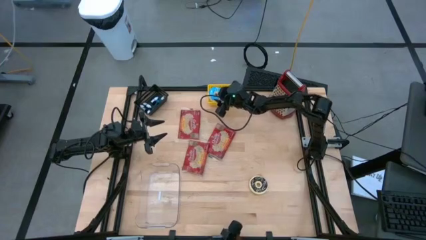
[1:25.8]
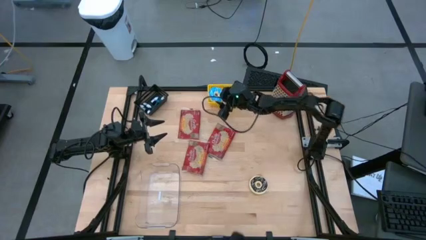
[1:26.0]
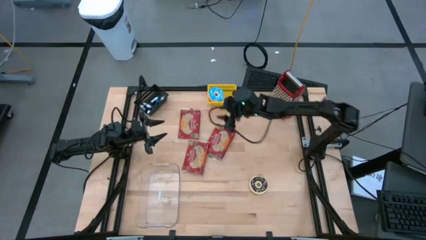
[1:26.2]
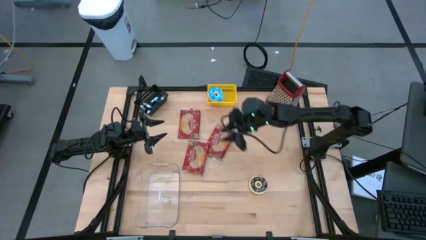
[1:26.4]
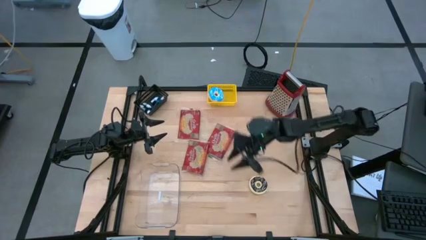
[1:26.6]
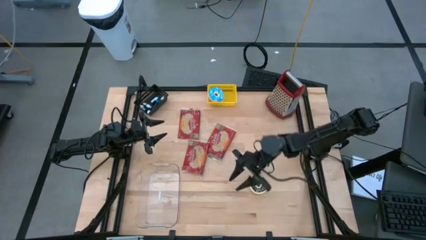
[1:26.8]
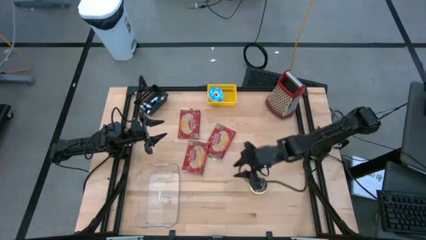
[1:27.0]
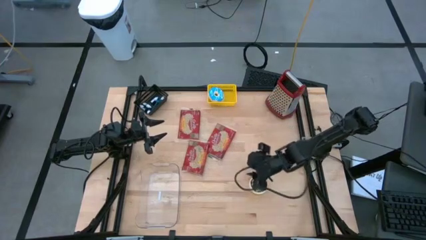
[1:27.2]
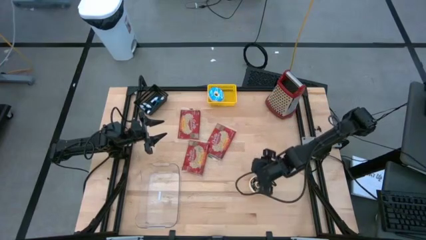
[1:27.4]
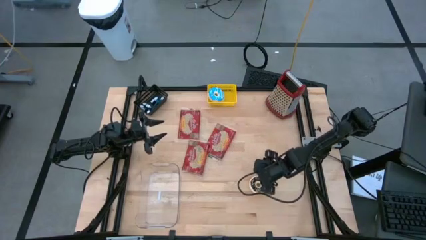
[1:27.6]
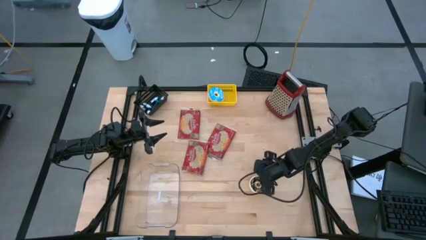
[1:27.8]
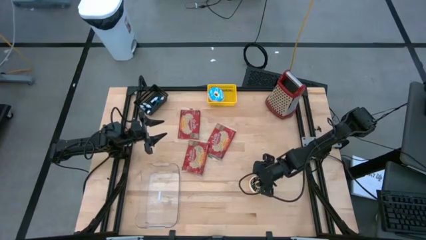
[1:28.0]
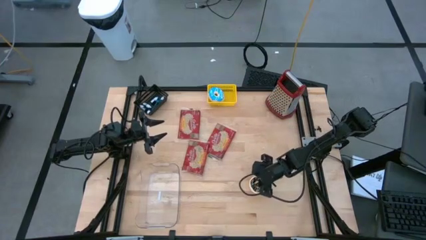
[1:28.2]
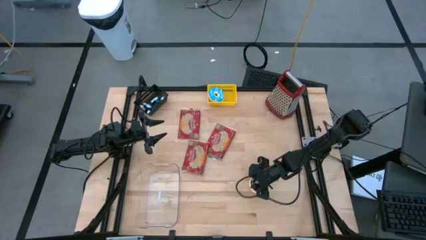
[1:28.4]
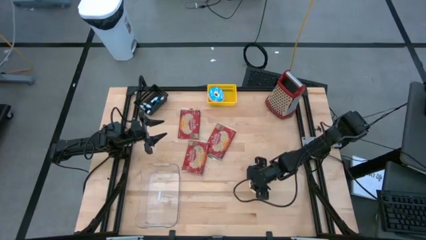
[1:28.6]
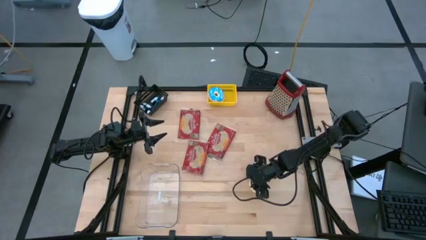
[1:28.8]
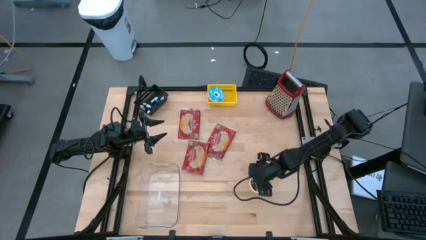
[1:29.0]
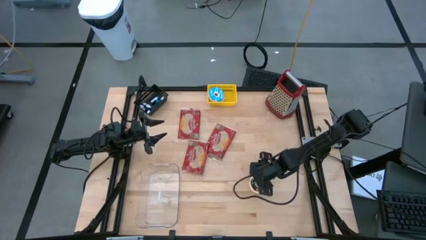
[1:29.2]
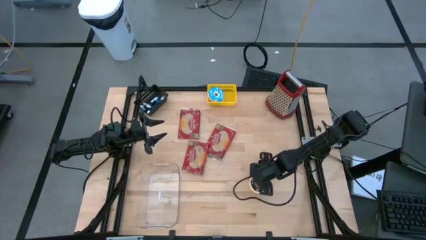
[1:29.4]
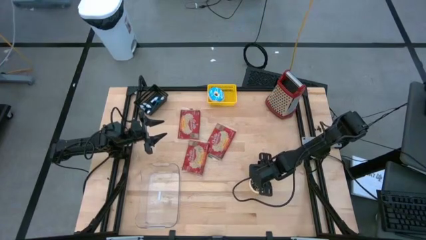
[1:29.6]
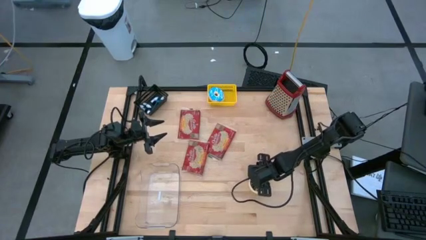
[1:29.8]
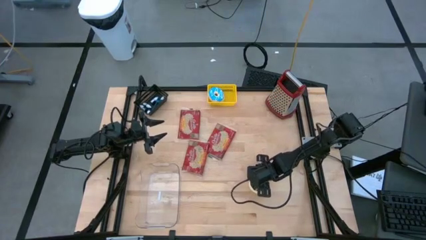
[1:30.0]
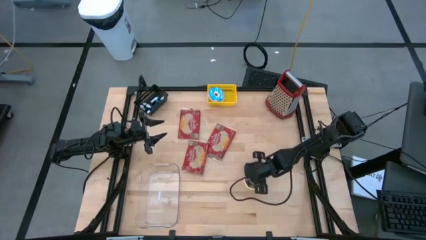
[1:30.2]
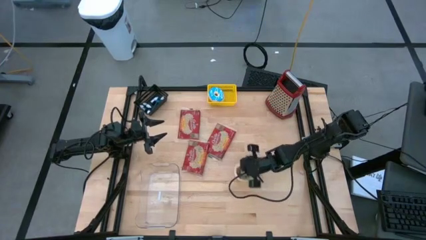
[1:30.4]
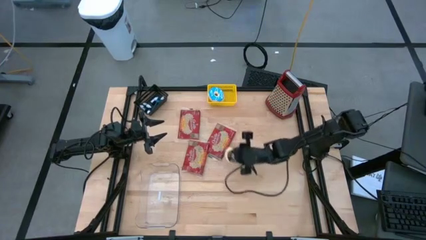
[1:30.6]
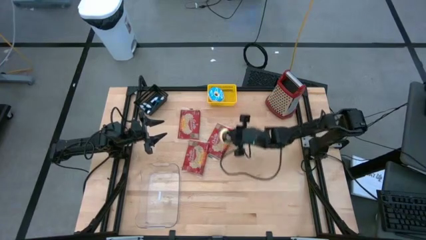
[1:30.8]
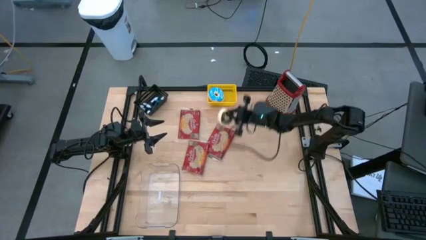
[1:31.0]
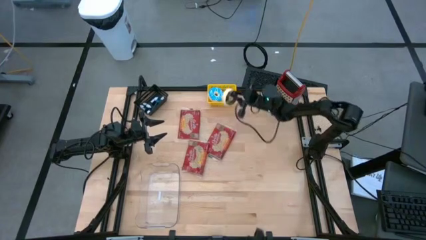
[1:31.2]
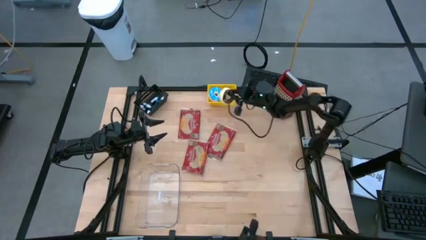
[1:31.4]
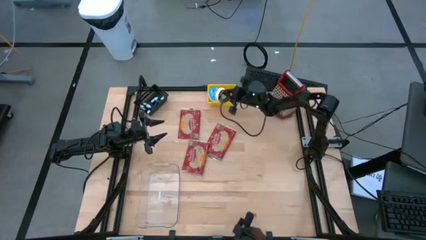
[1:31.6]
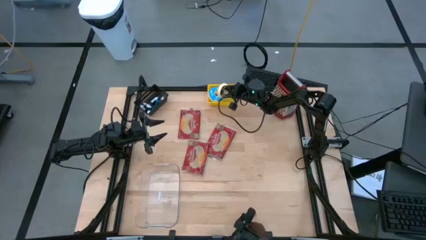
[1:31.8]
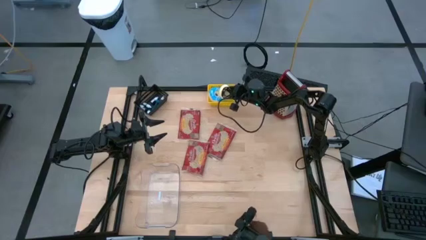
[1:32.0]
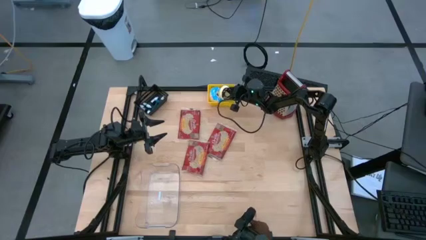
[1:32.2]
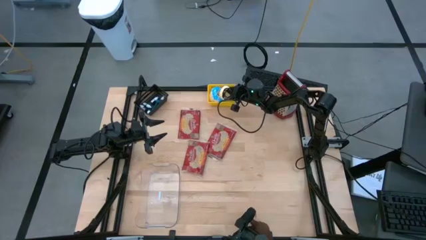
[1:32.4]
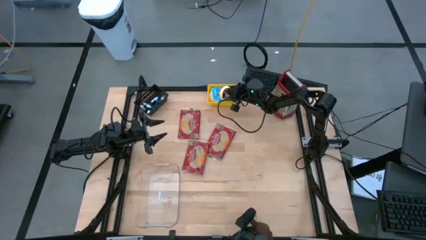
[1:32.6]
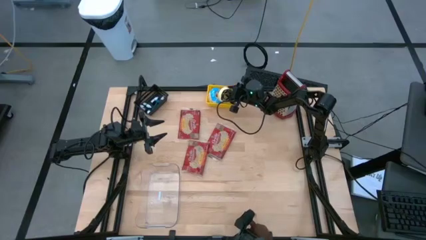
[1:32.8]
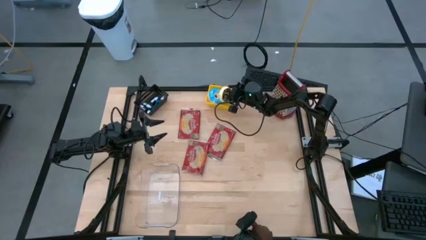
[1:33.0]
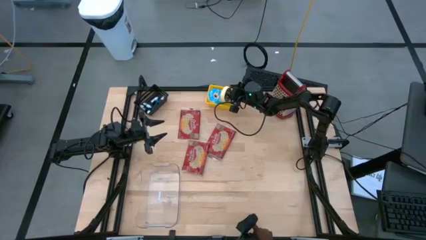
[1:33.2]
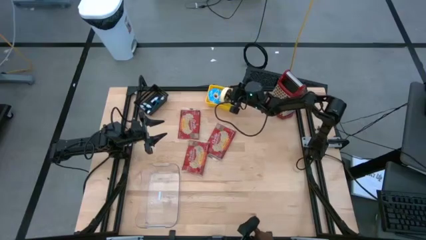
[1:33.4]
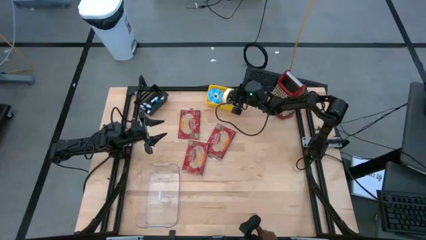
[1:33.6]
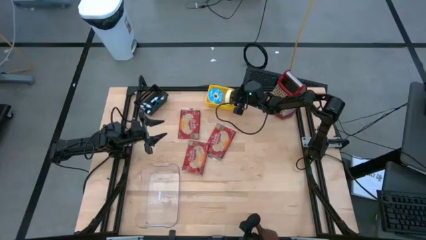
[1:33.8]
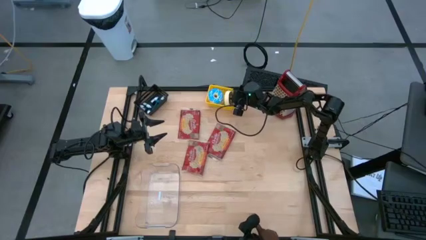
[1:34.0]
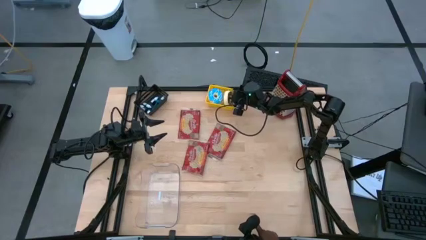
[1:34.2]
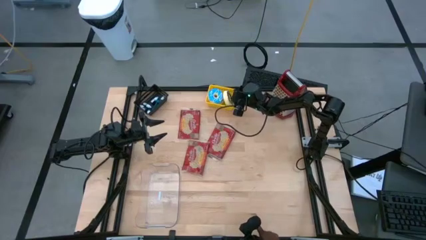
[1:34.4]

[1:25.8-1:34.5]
Put the black donut into the yellow bin

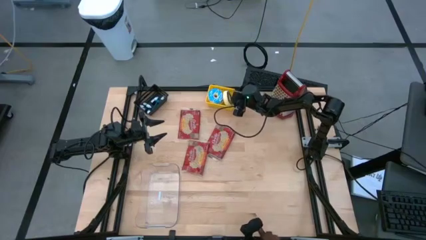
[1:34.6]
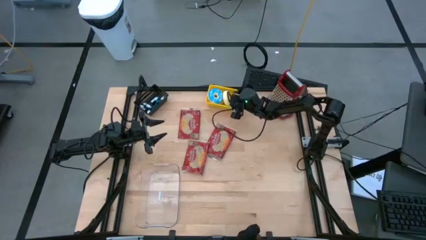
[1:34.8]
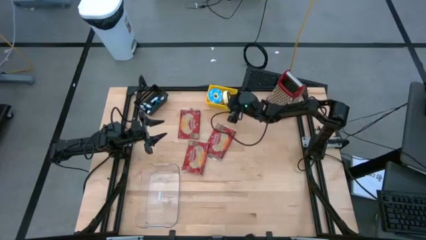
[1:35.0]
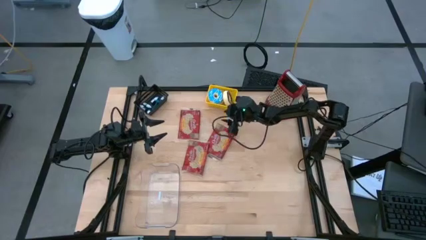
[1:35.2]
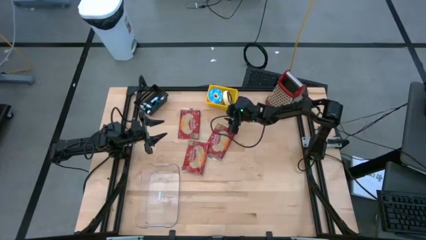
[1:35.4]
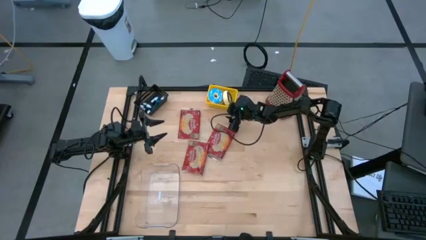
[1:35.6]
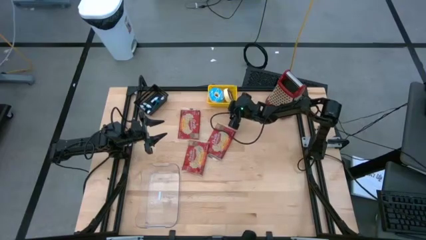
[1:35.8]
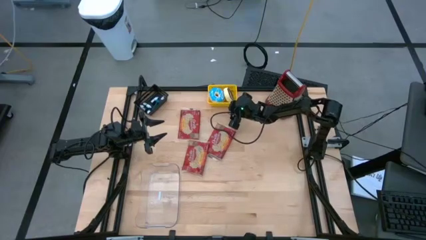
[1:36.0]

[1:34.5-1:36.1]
Adjust the yellow bin on the table
